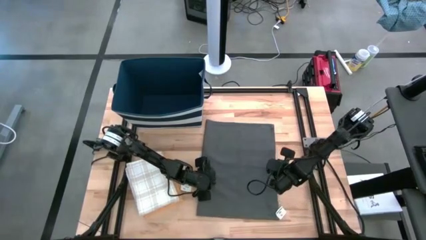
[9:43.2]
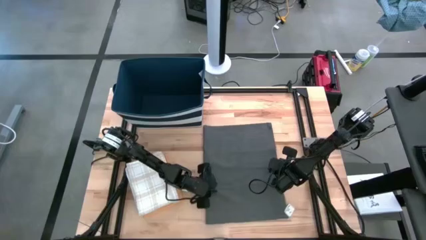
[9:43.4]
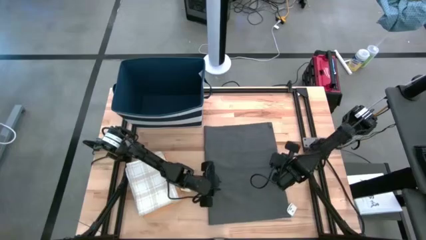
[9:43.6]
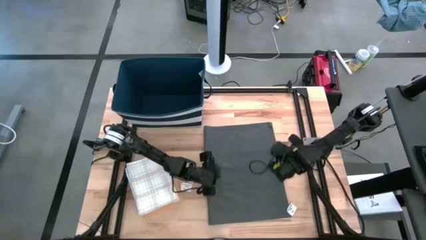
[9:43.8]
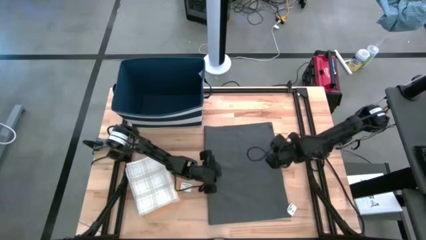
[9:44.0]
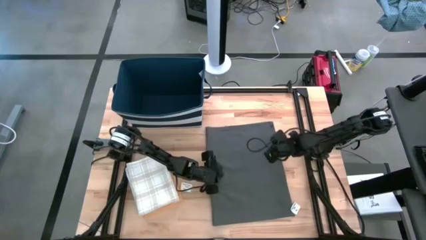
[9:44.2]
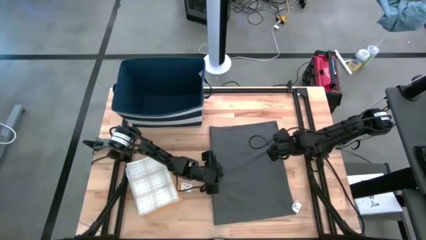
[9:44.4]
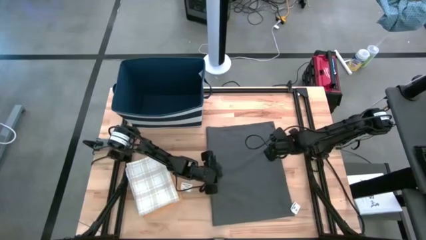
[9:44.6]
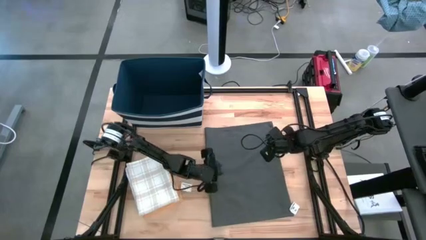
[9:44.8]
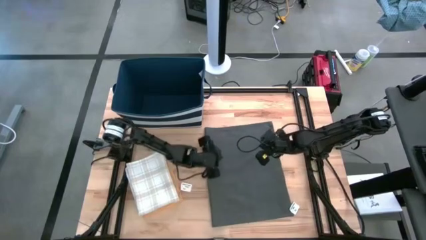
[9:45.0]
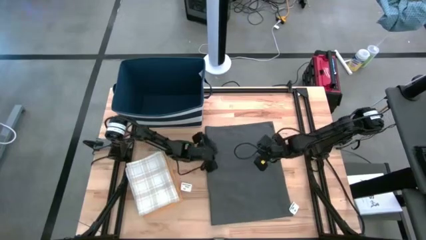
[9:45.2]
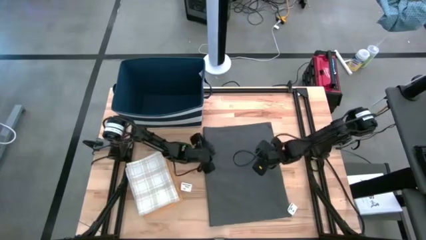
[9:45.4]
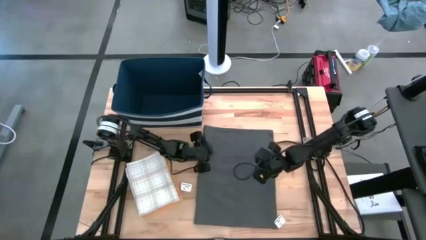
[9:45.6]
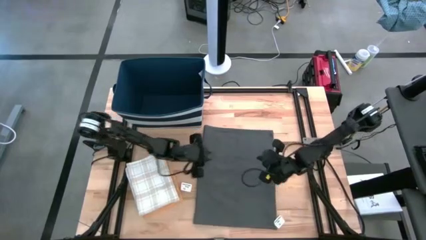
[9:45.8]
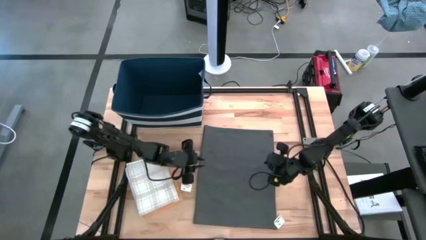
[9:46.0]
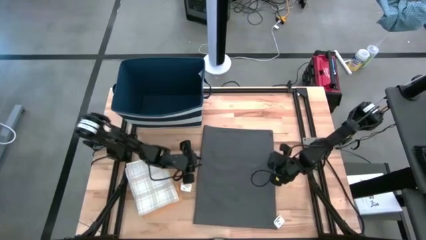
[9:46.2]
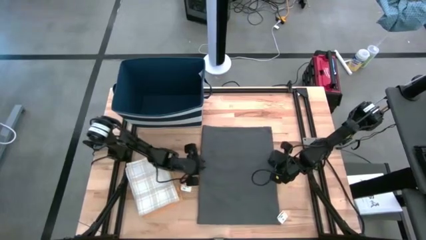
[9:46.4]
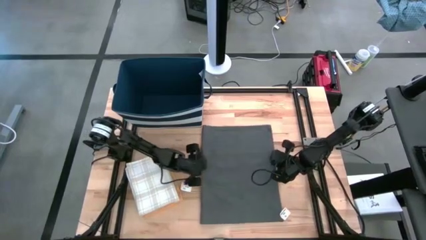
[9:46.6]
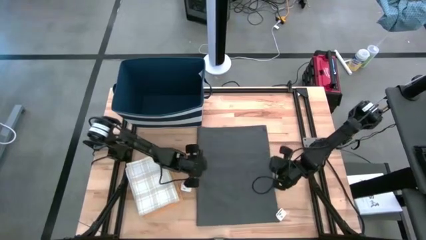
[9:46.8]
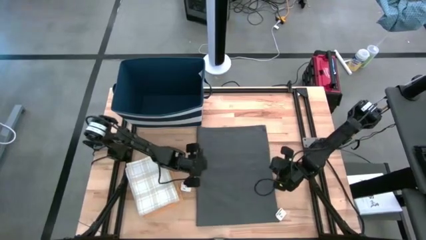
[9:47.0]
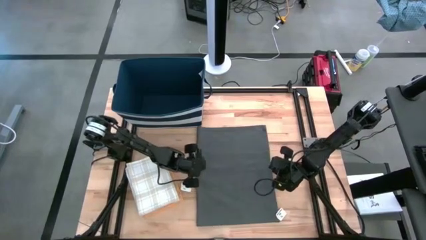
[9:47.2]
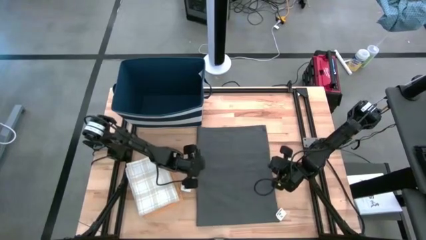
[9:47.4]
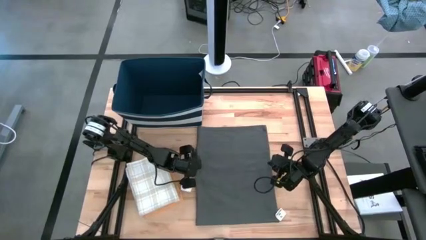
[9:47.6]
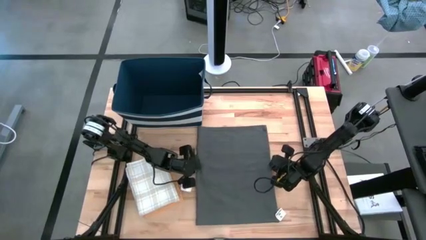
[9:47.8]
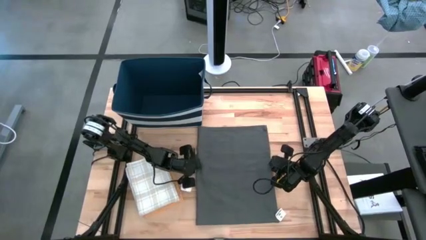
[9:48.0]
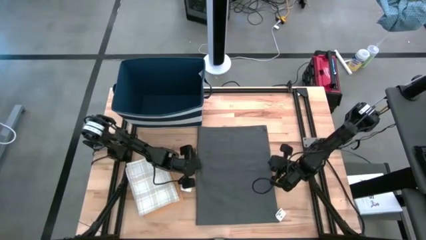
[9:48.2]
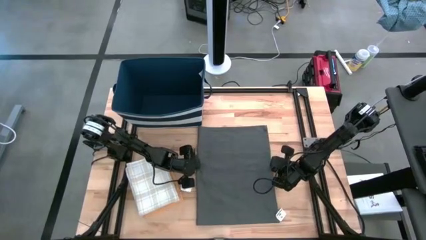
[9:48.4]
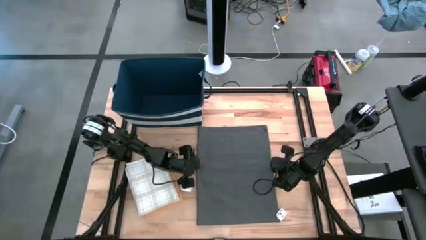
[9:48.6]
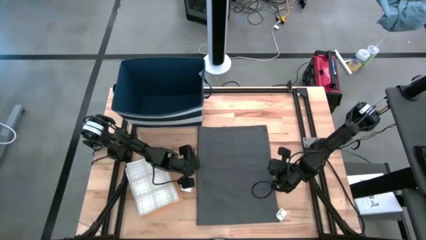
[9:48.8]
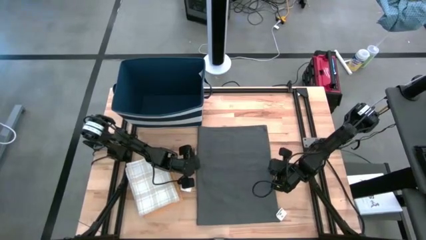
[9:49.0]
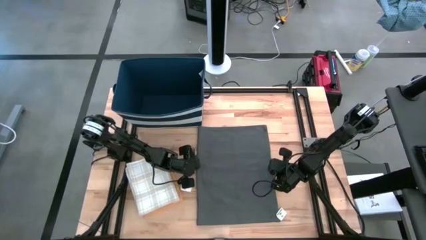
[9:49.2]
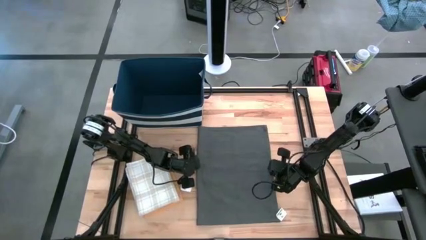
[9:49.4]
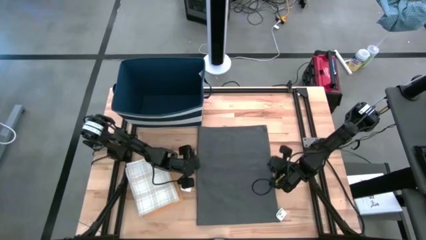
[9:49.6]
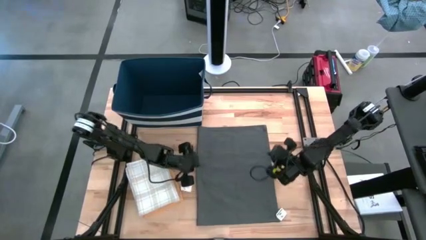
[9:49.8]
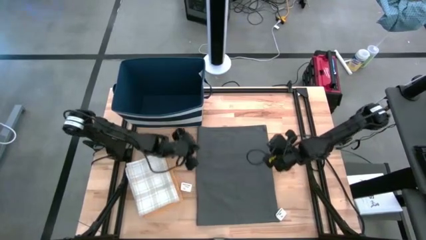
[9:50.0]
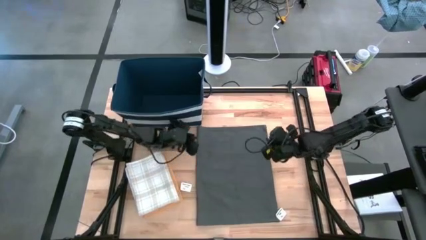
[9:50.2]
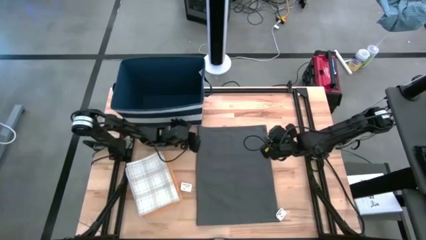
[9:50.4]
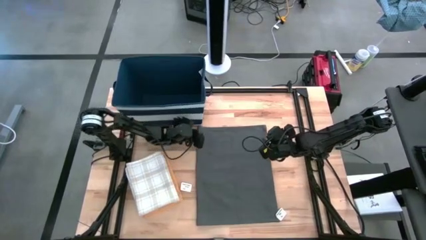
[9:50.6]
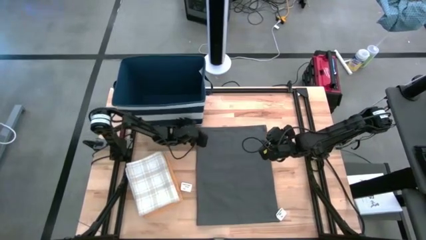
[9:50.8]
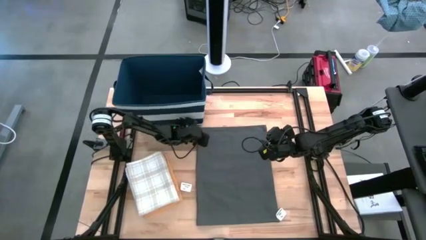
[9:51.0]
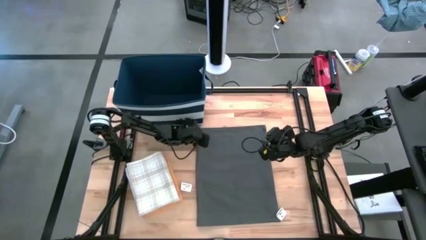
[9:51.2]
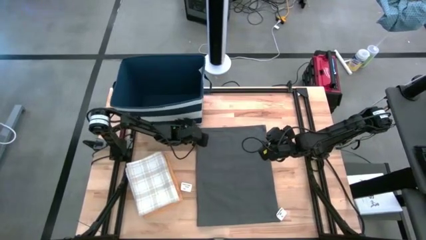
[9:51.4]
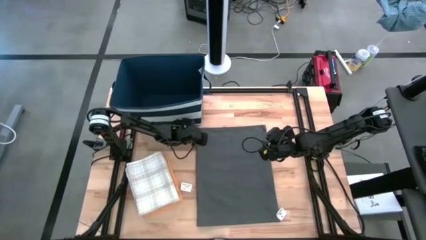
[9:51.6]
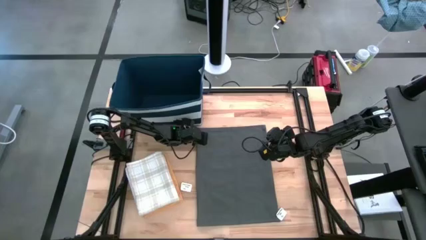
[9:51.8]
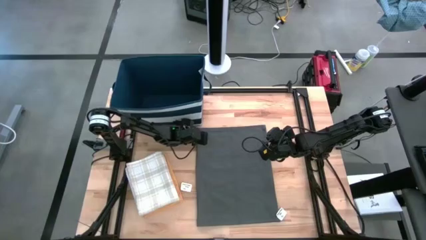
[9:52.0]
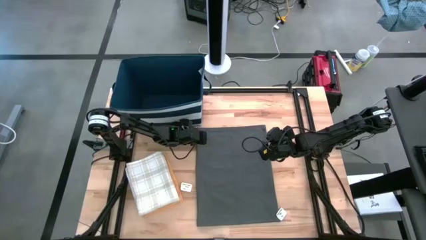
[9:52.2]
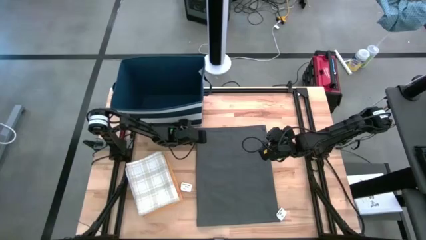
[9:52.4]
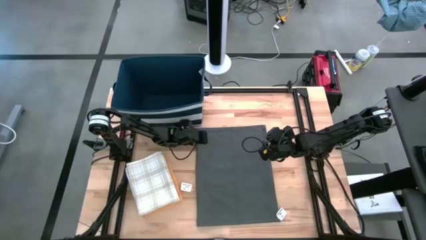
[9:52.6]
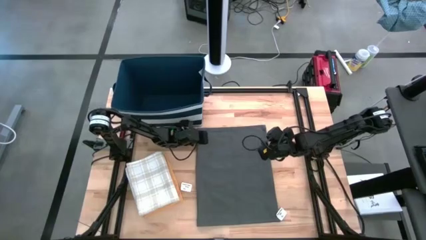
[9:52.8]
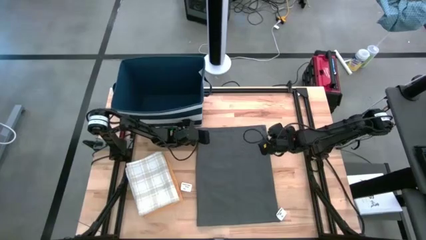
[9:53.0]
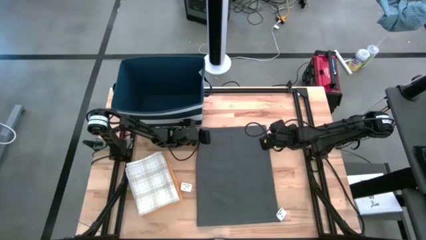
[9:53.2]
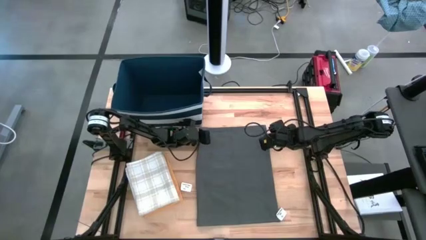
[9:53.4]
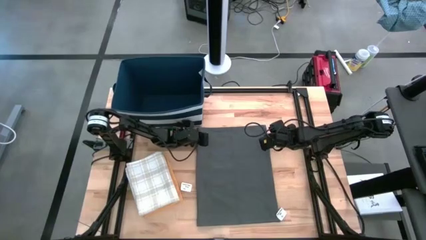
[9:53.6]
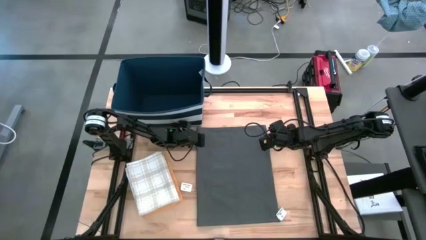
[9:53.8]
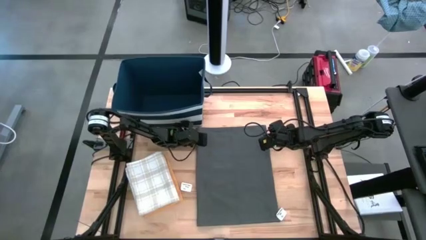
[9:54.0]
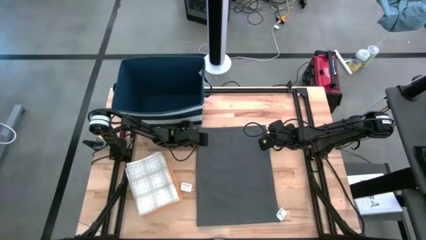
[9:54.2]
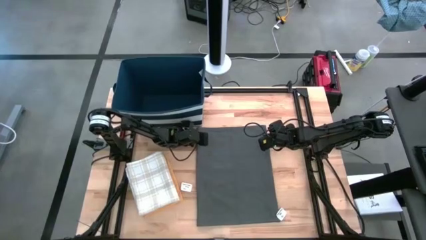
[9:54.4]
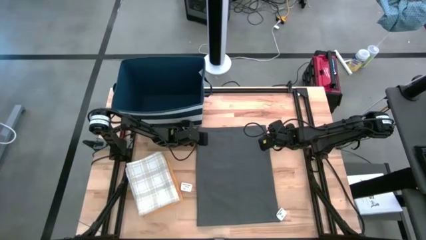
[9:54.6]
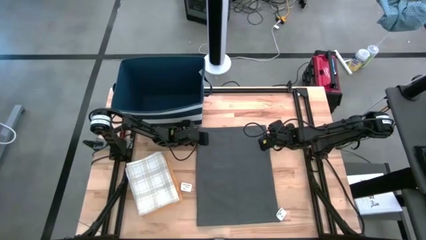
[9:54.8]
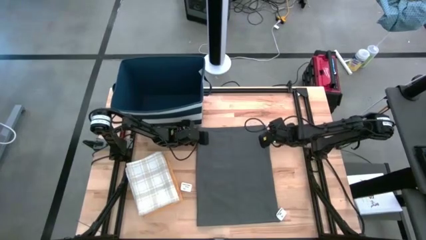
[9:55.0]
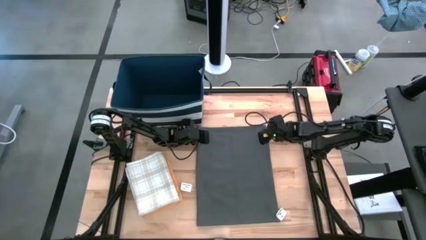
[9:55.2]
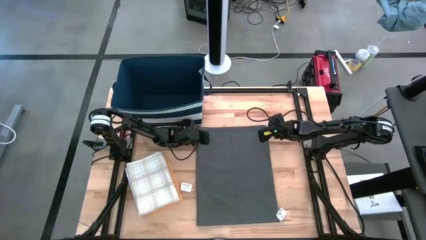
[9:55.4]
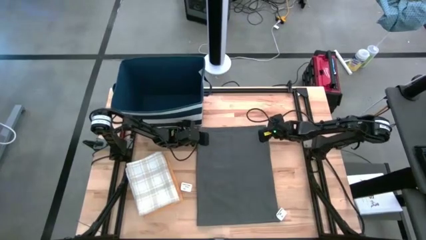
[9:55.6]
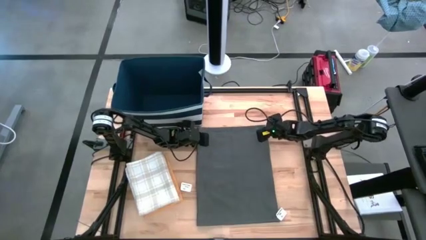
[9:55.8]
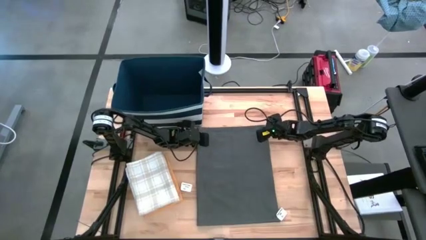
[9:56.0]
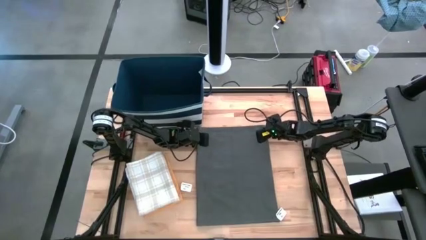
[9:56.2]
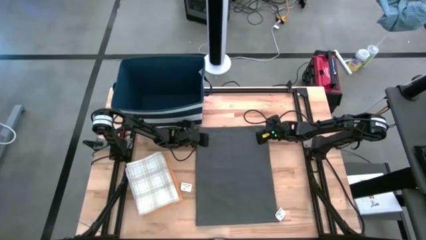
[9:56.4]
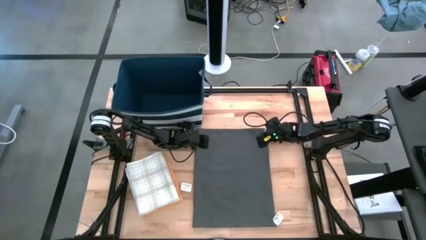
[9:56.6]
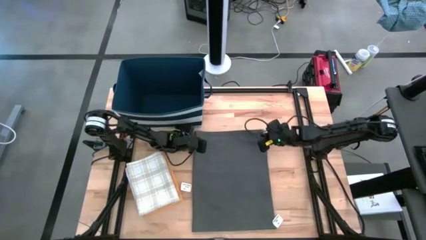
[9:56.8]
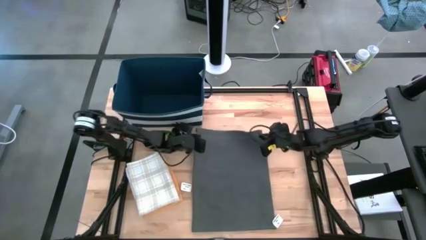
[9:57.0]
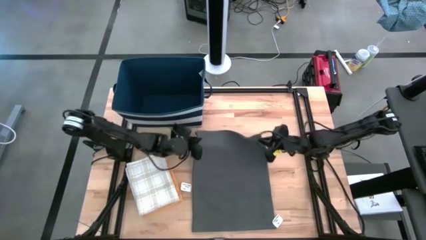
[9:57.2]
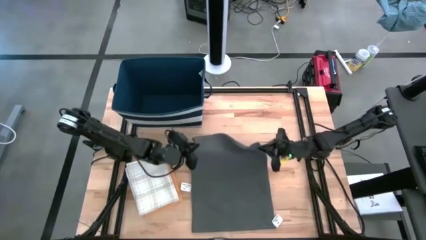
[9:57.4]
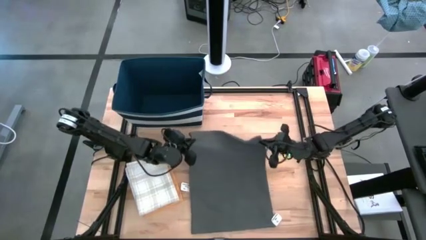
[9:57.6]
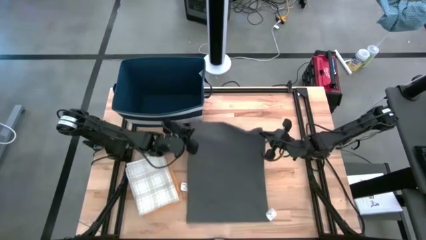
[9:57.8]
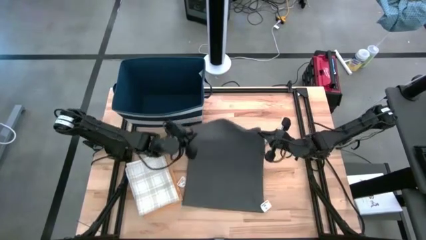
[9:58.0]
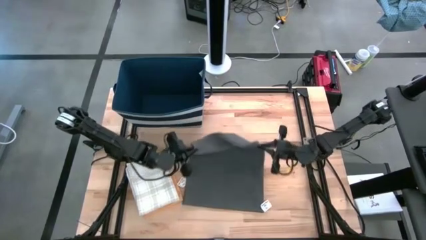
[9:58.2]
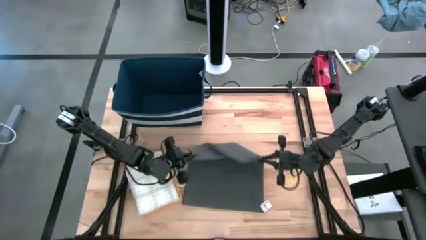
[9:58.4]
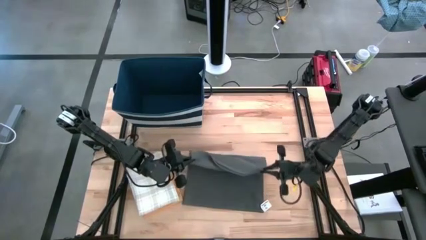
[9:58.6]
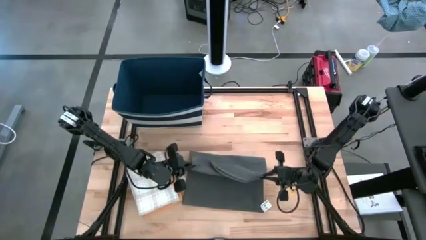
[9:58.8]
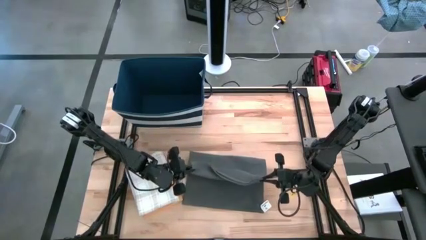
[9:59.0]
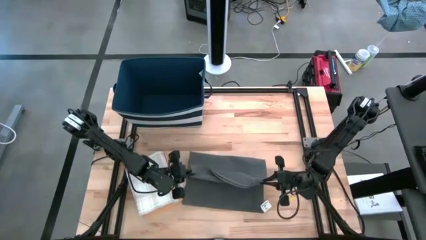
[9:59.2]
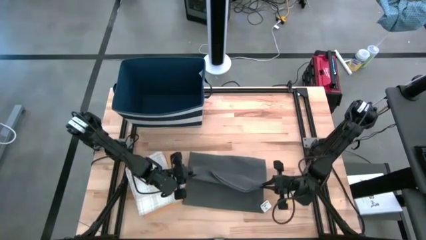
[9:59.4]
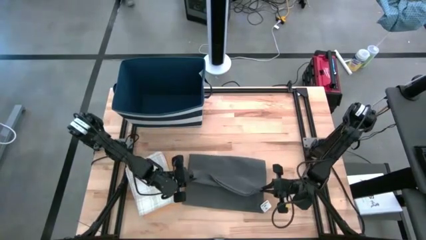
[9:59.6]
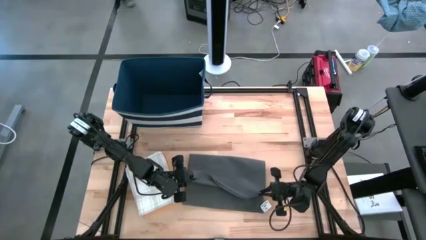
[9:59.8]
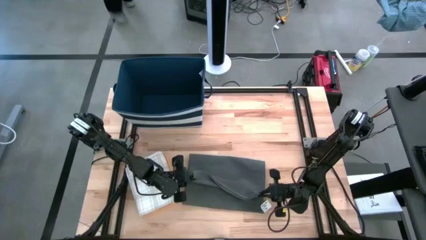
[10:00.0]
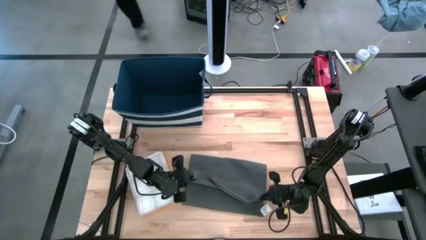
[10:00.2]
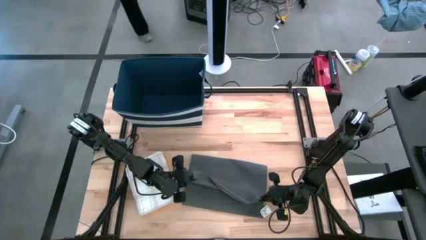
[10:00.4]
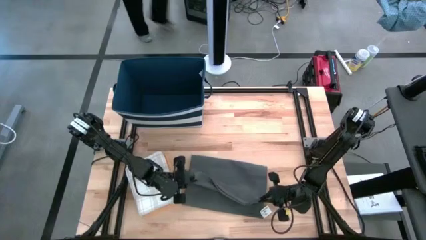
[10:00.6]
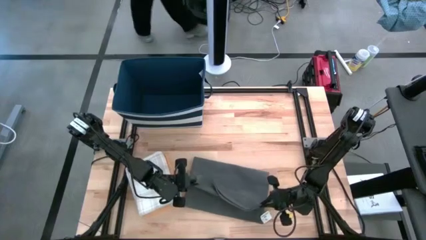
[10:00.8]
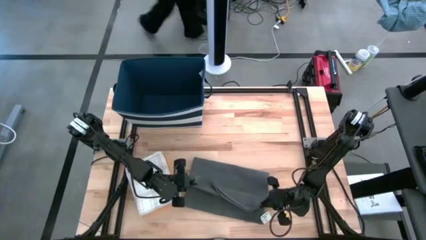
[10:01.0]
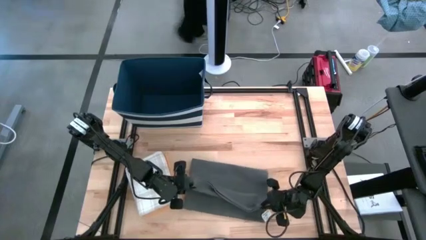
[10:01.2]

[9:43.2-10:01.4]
Task: Fold towel
Fold the gray kitchen towel
